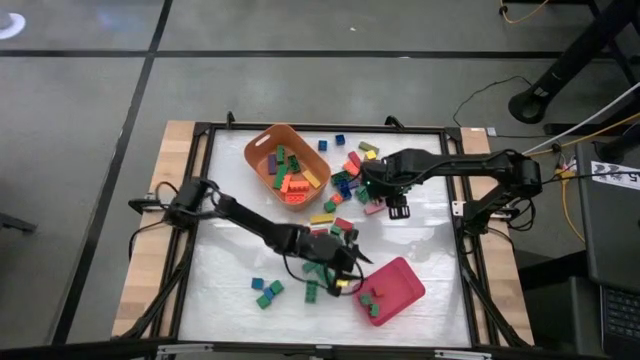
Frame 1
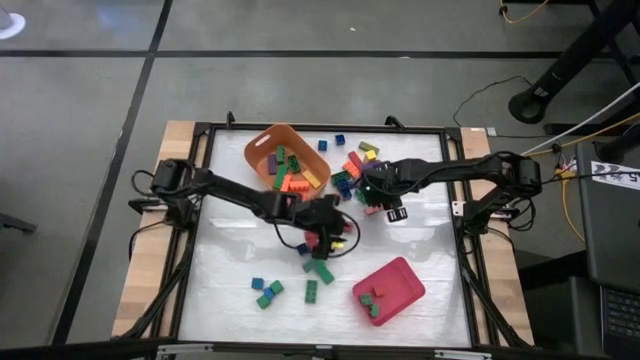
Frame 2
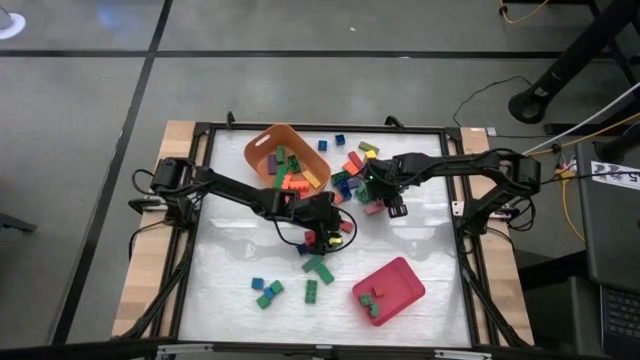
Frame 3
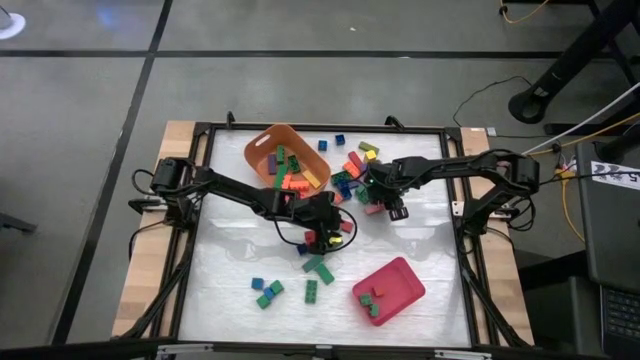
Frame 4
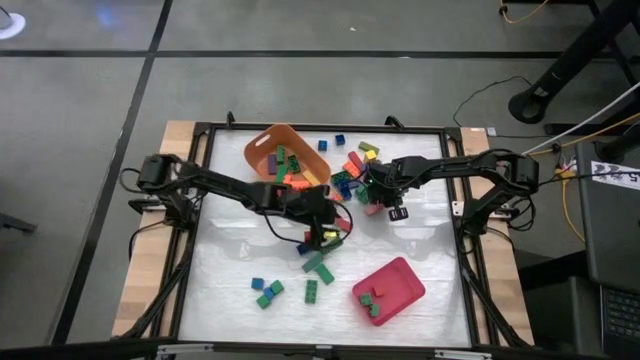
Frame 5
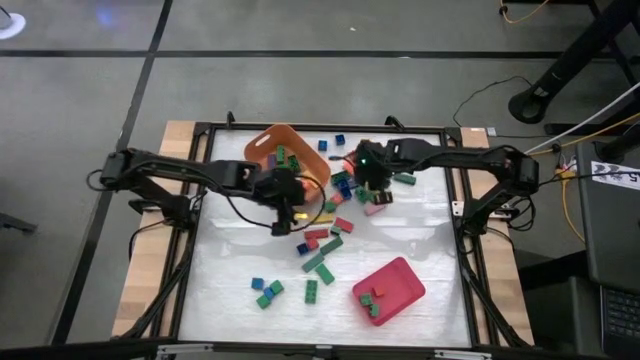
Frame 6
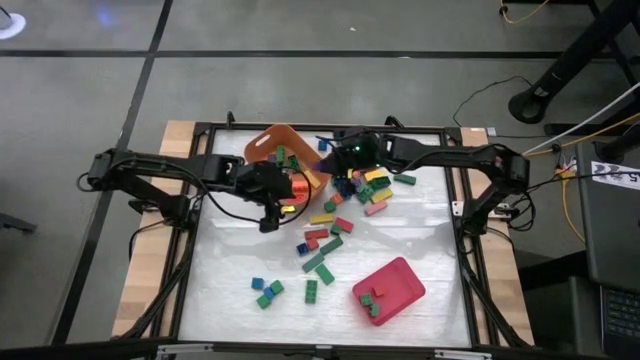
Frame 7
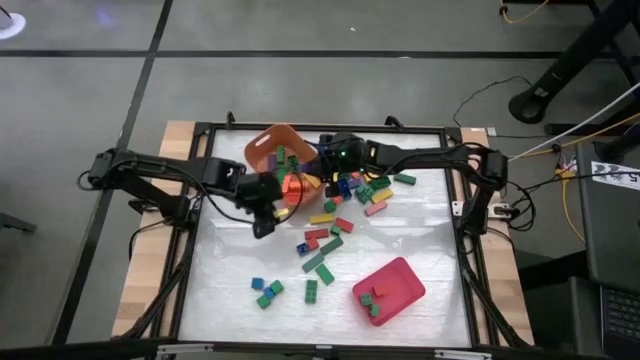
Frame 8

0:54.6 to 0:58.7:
Task: Sort blocks by size
Put the large dark blue block into the orange bin

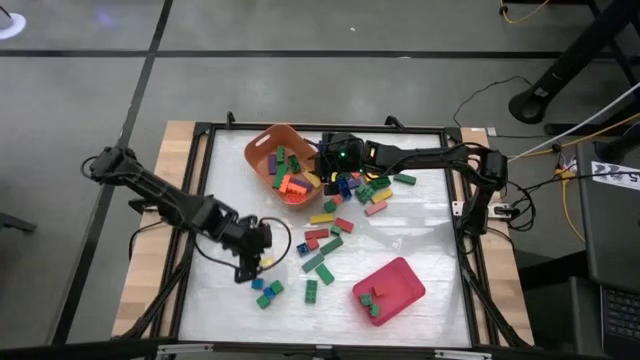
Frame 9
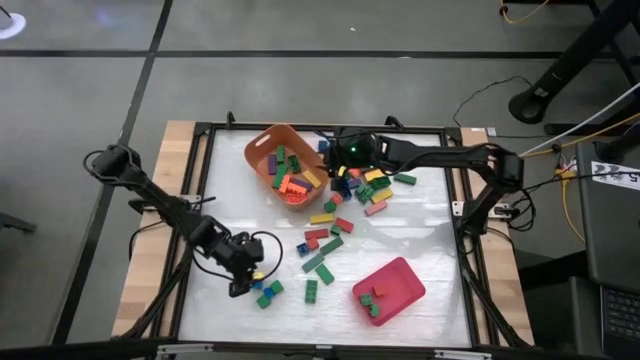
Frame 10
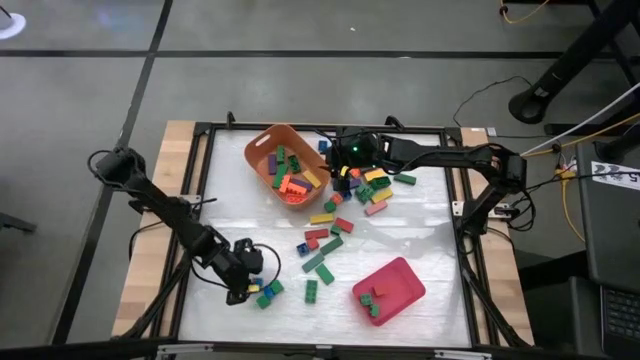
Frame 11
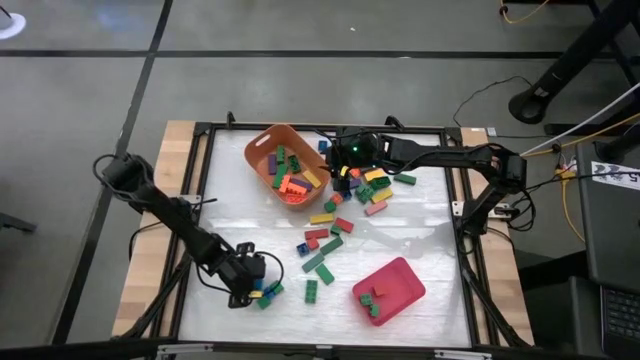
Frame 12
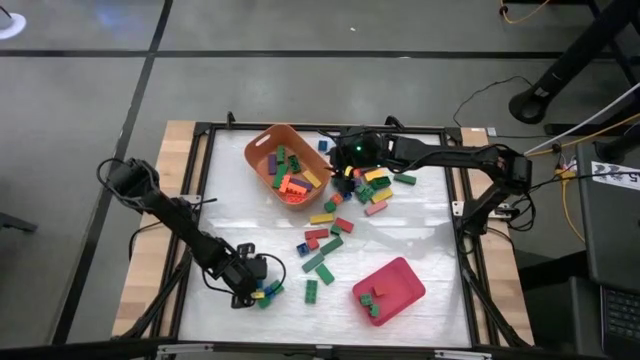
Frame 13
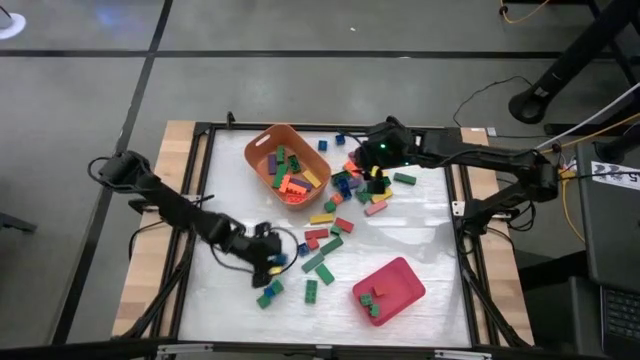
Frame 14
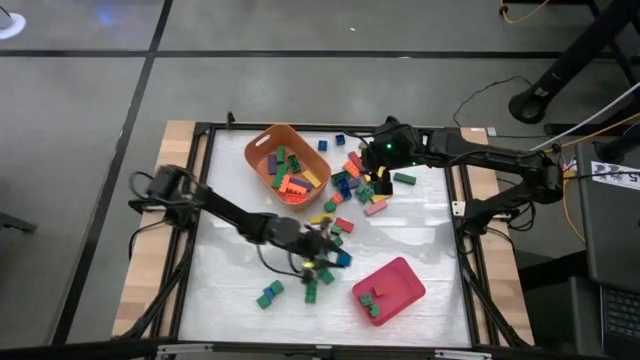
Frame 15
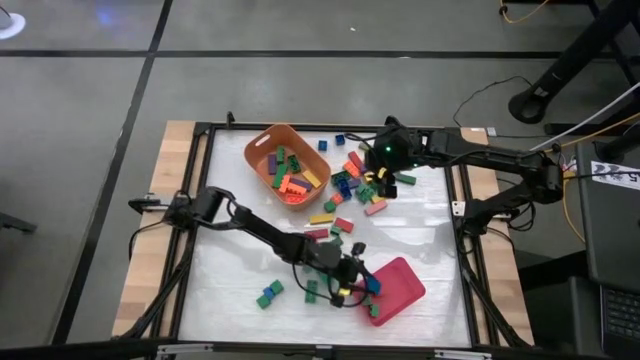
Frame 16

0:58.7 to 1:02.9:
Put the small blue block into the red bin

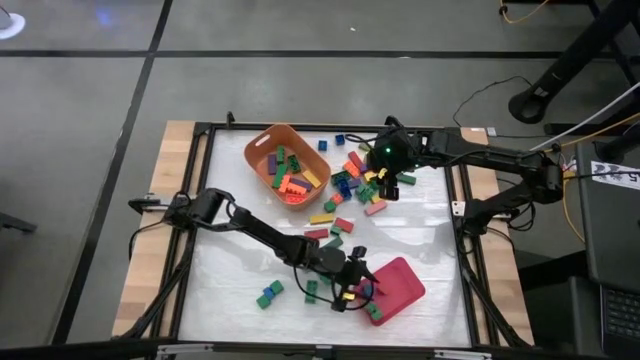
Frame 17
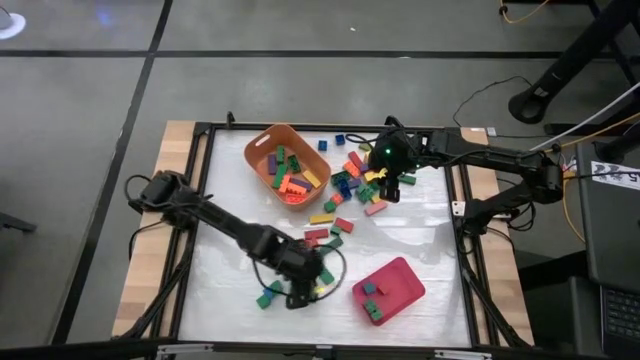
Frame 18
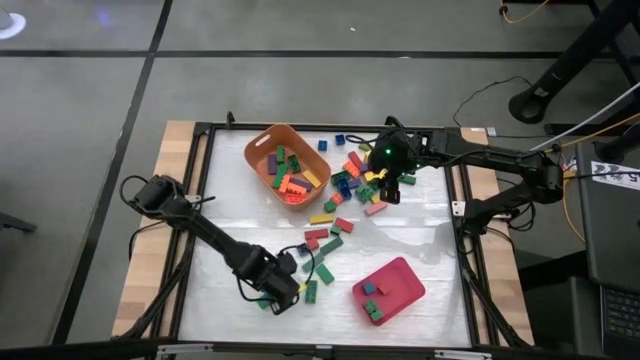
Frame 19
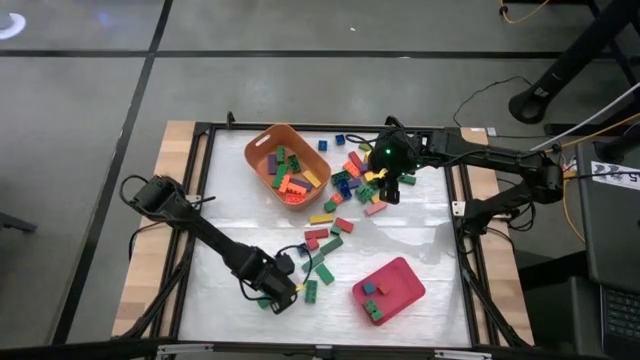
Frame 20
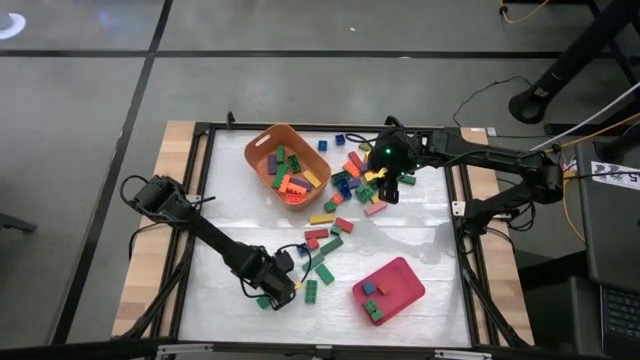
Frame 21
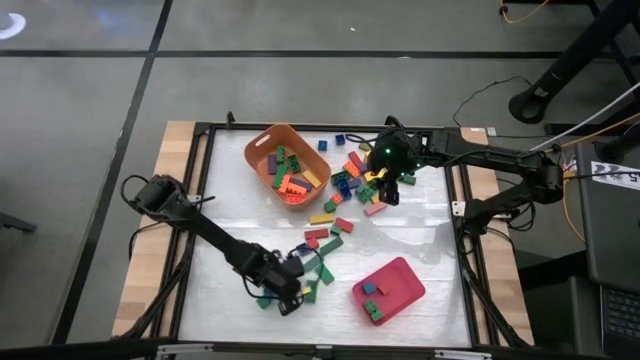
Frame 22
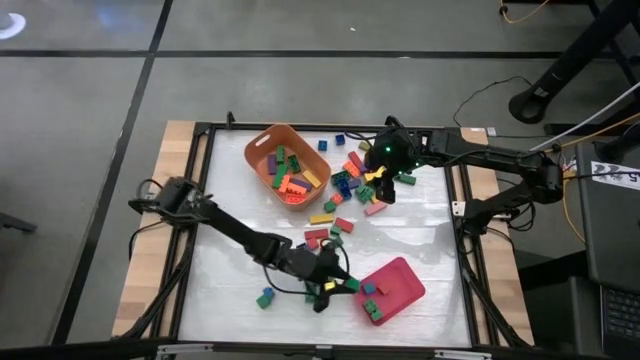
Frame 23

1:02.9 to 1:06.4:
Put the small green block into the red bin

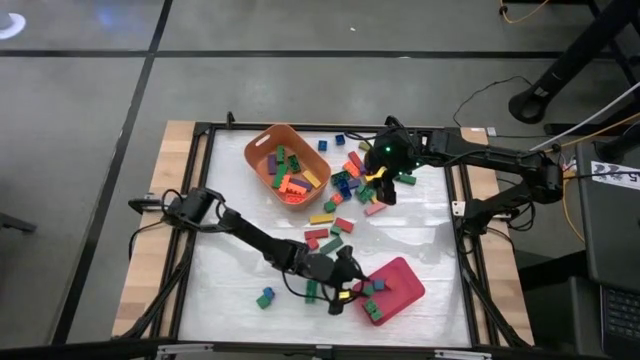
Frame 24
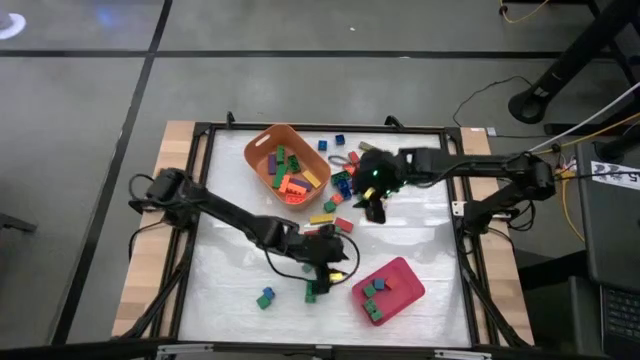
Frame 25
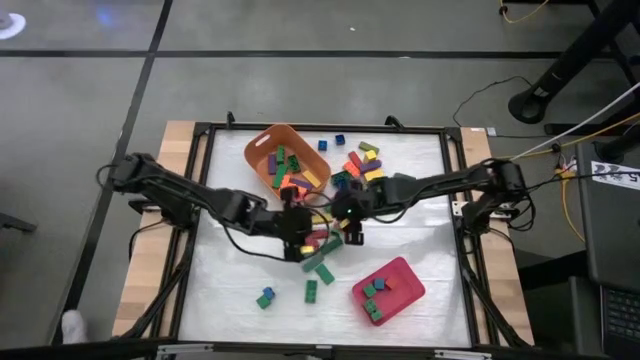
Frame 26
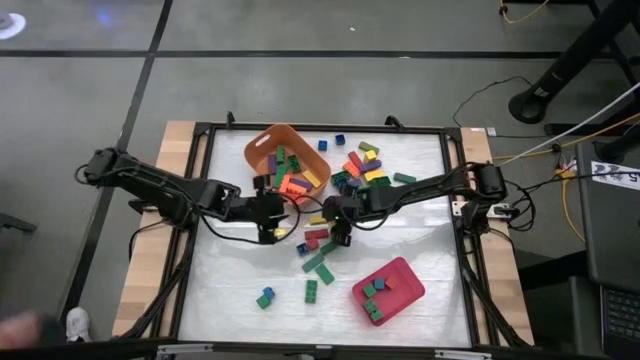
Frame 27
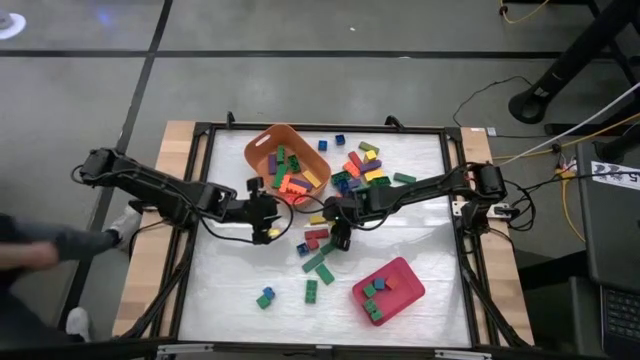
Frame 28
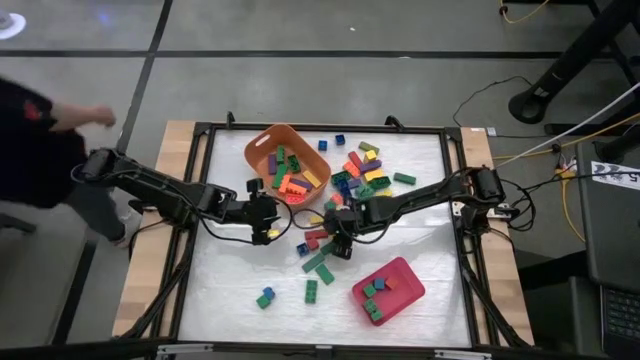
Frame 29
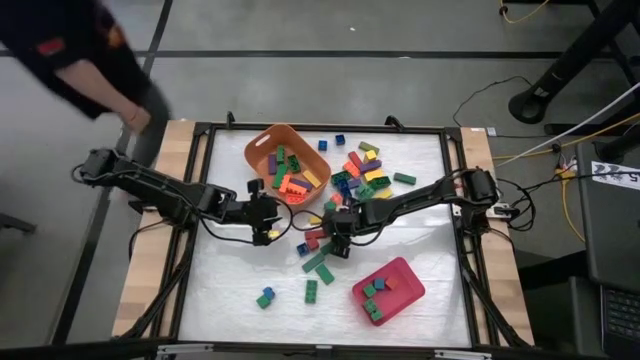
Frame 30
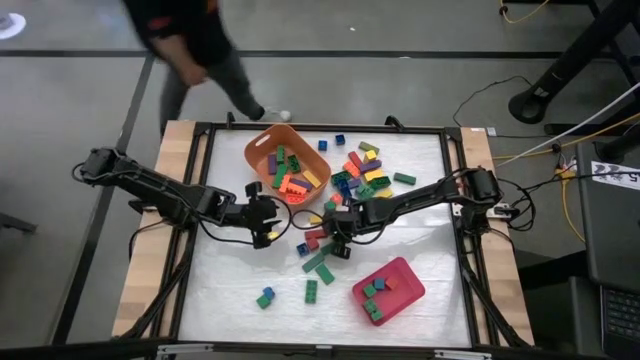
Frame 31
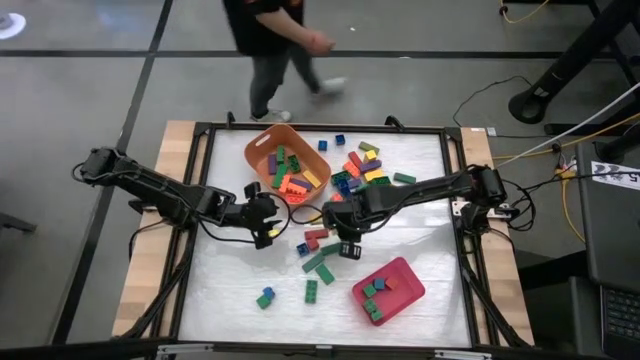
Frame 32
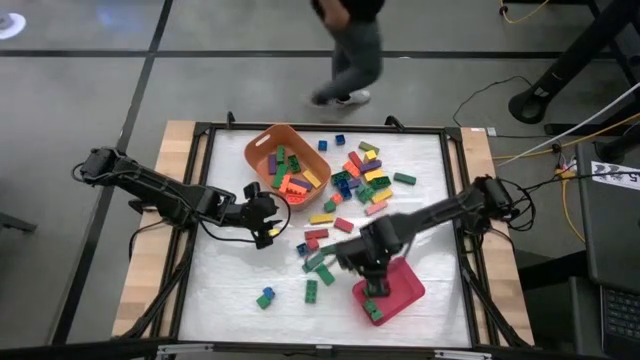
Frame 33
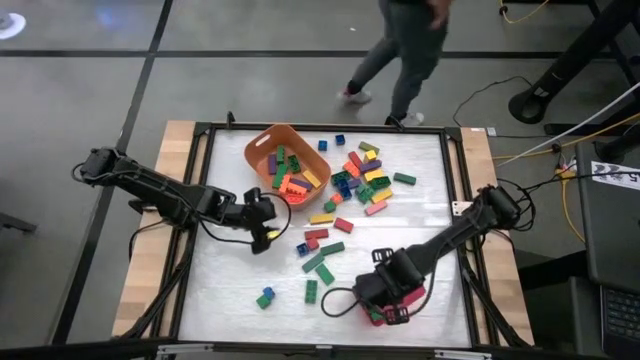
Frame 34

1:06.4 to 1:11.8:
Put the small green game piece into the red bin

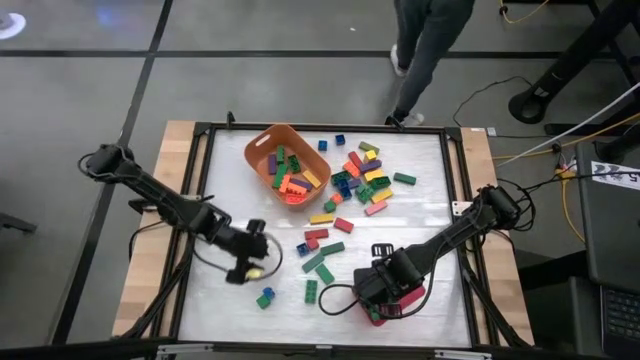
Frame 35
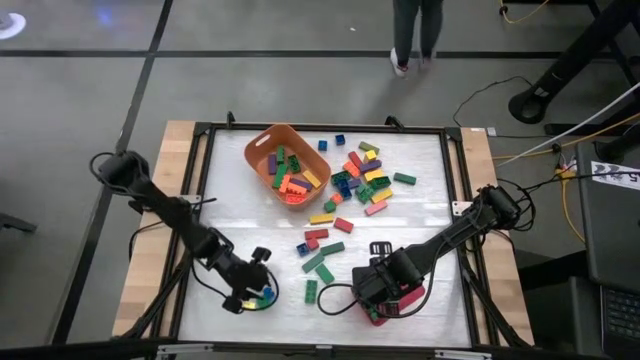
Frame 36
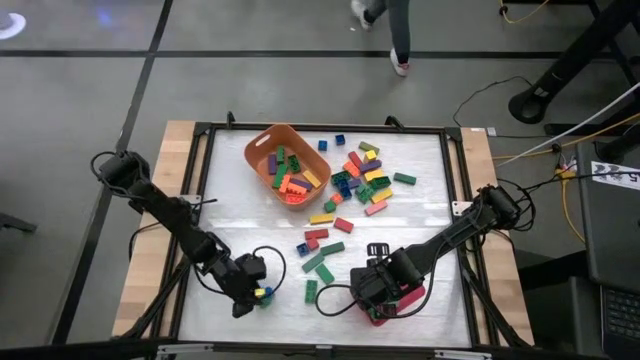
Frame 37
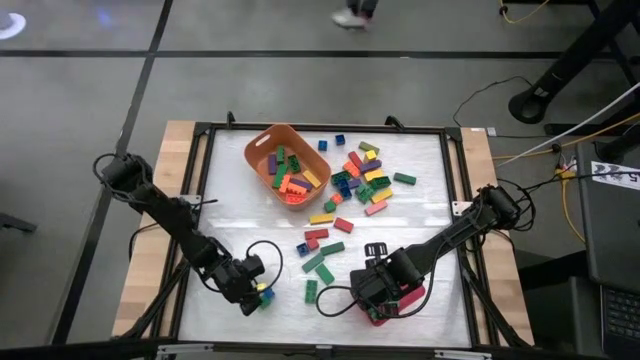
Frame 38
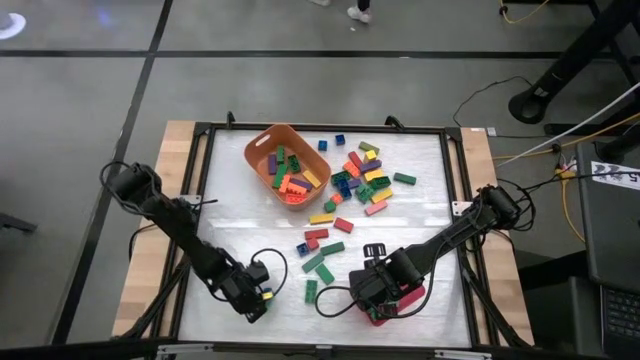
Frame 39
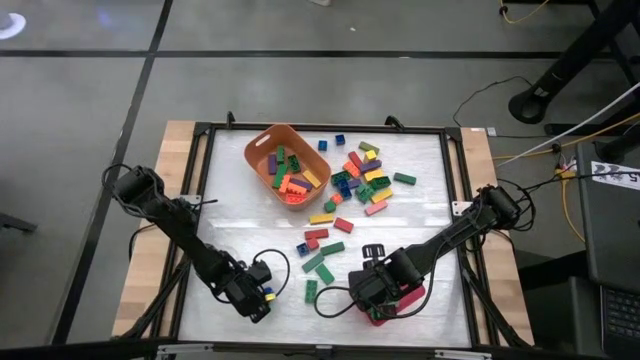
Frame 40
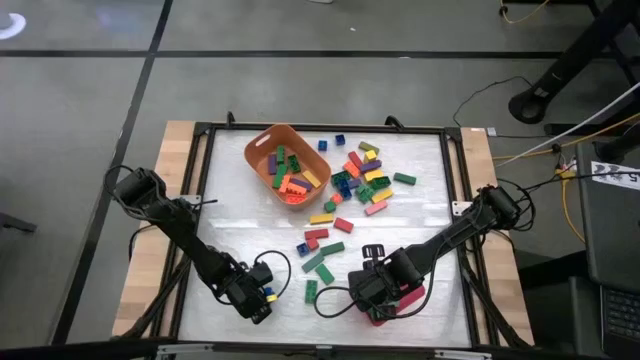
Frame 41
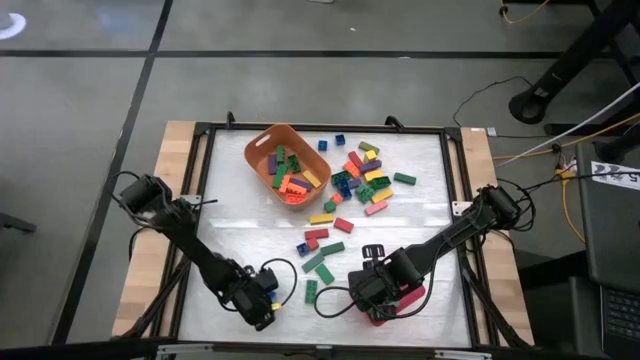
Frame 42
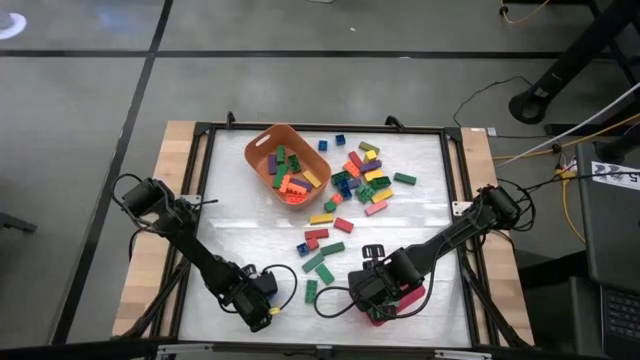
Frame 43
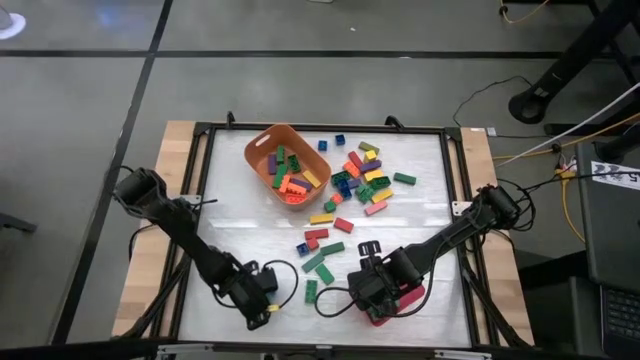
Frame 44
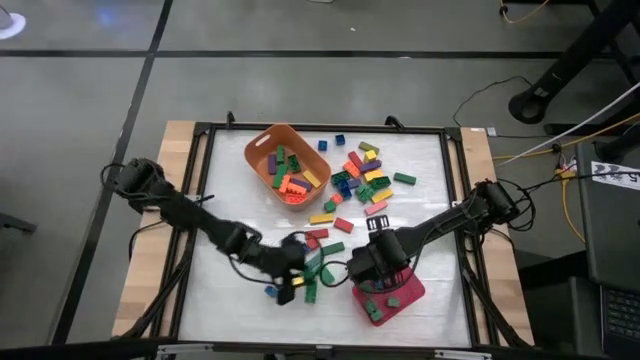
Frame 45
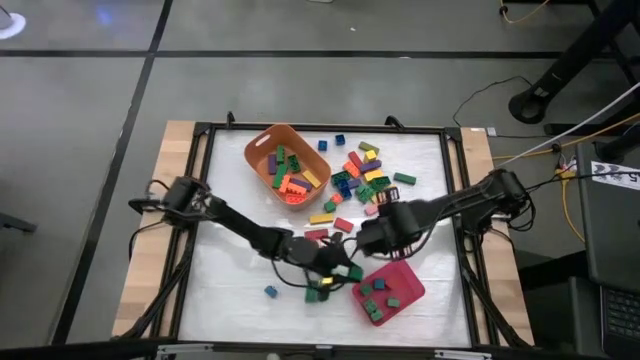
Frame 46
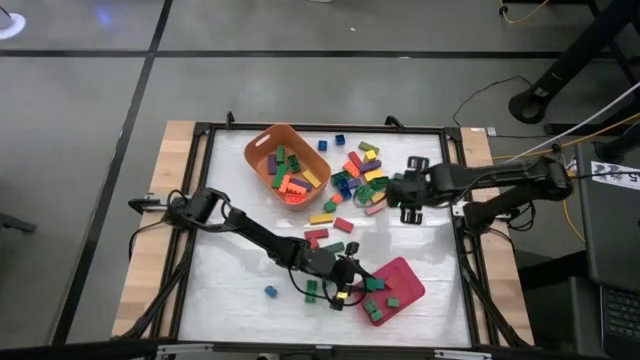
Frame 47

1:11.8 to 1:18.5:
Put the small green block into the red bin
